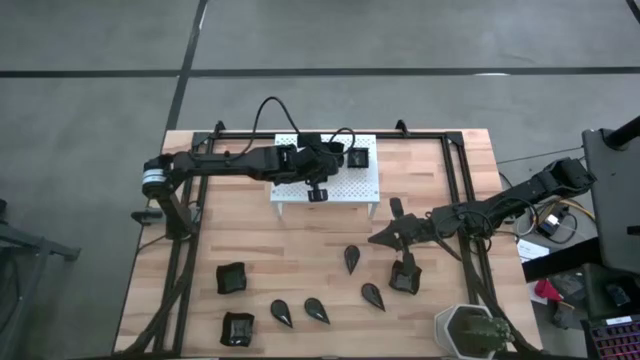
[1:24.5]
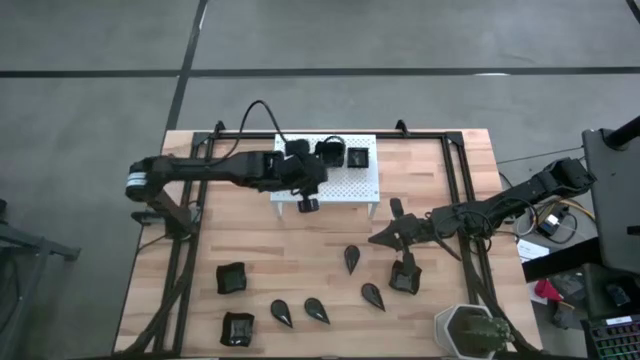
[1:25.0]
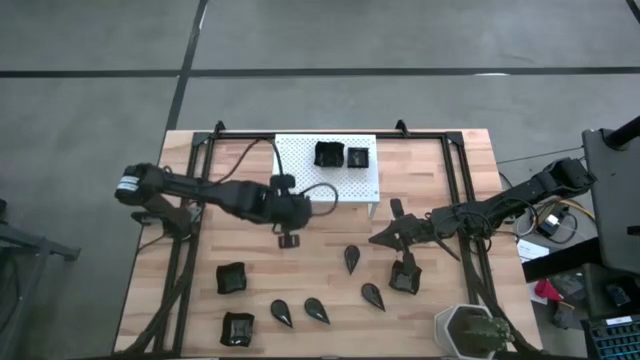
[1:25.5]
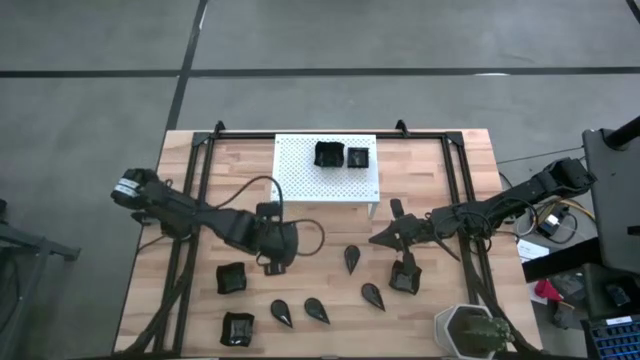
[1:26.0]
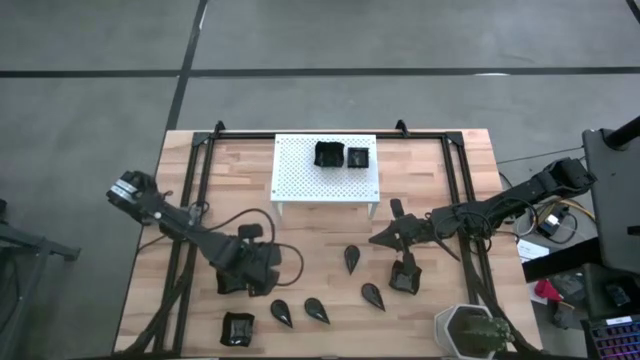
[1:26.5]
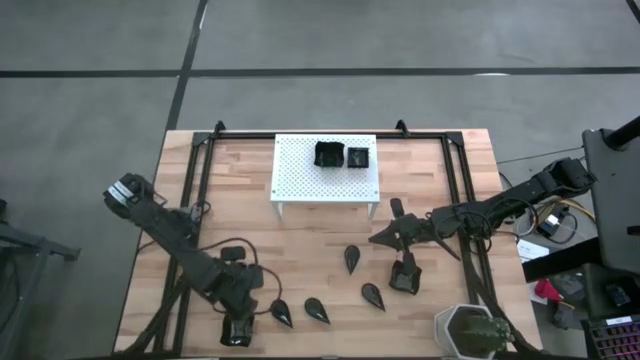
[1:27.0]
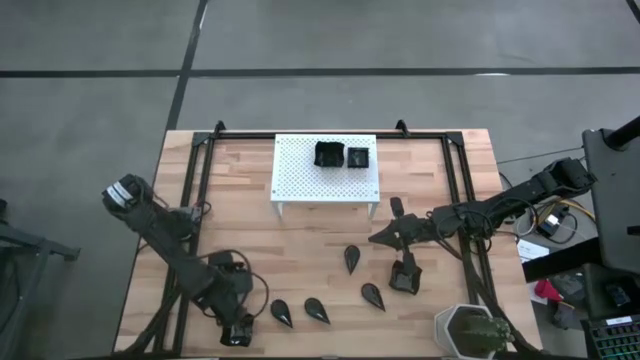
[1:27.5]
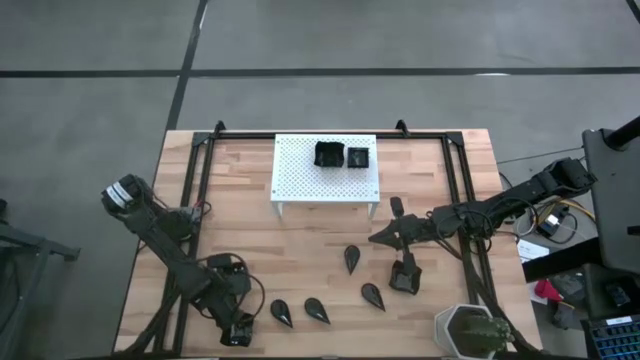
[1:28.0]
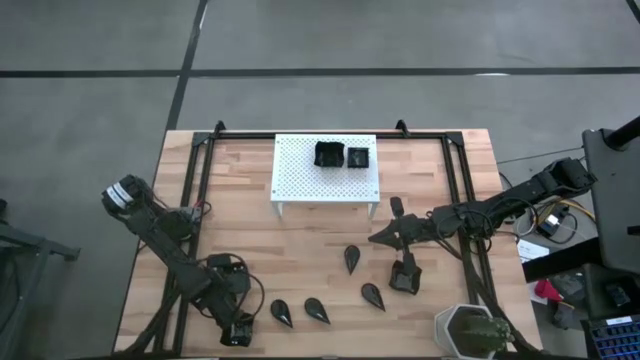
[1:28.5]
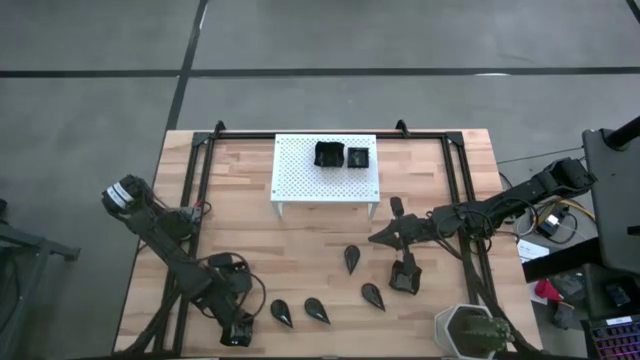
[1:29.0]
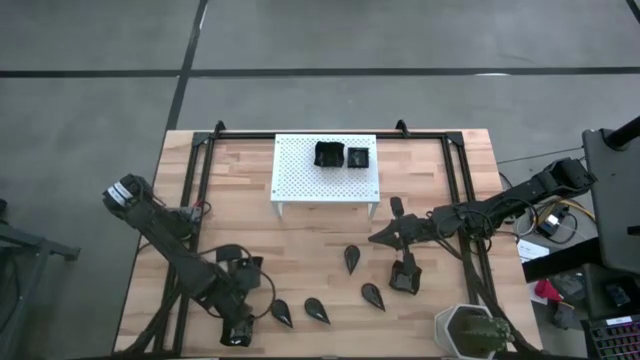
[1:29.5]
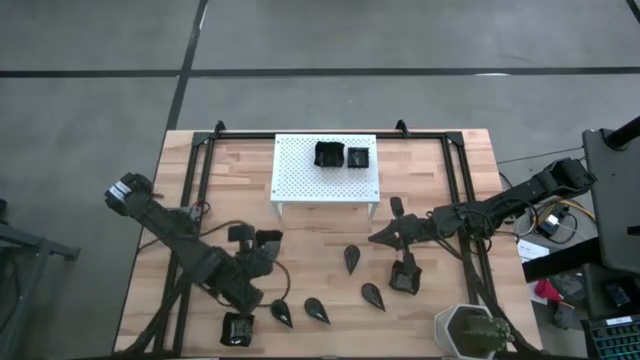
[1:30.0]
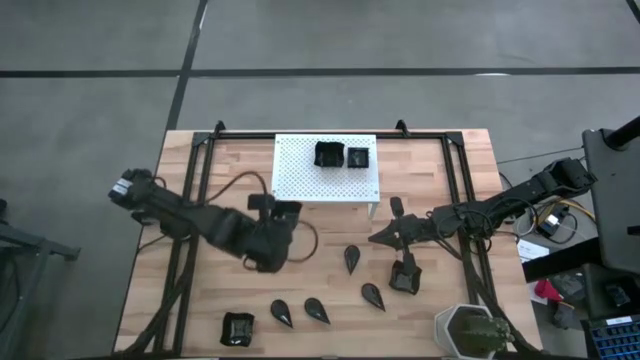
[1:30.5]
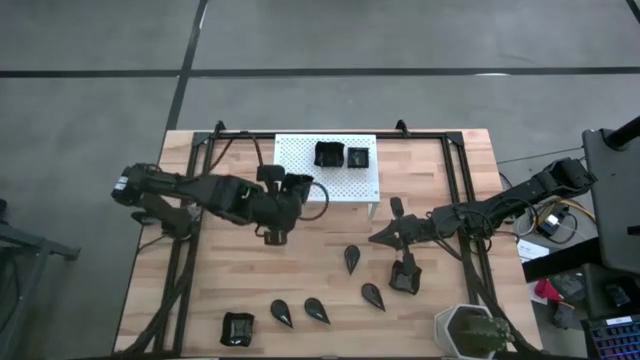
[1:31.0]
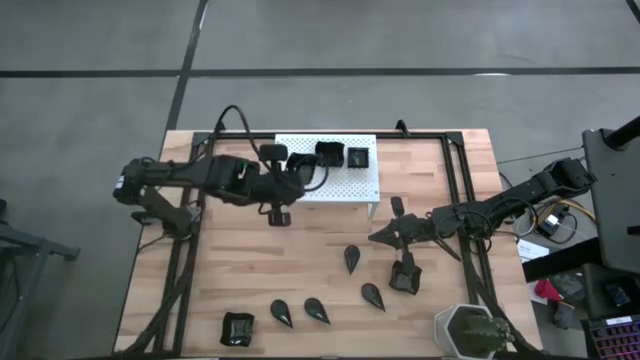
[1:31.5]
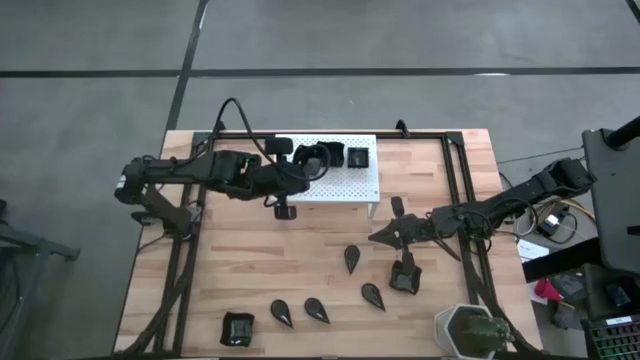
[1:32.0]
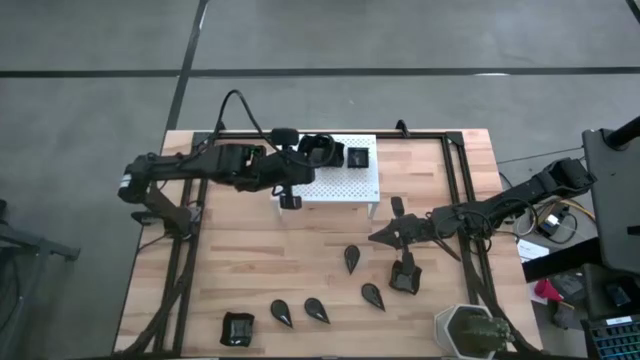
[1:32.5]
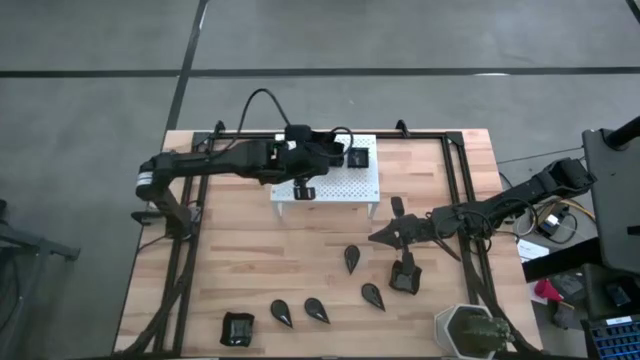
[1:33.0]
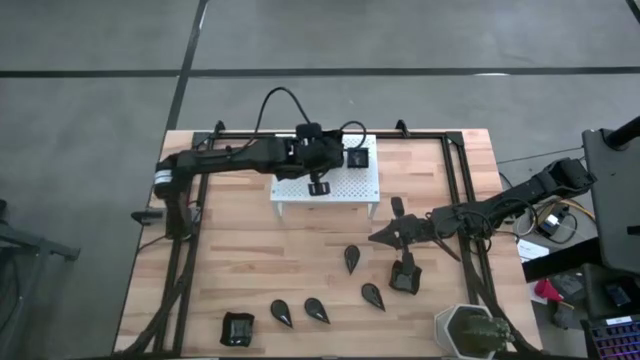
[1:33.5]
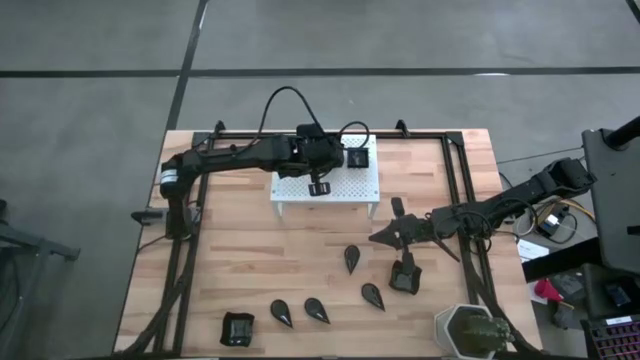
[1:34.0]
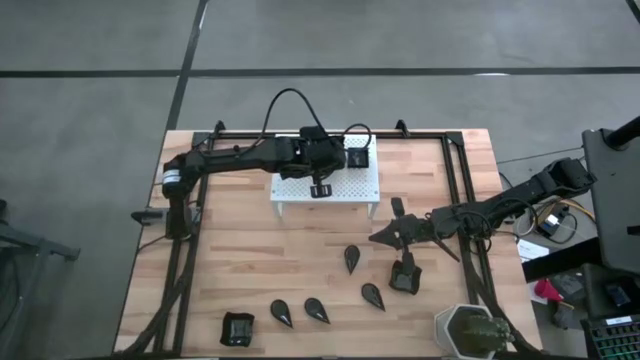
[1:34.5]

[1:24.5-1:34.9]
Task: Pick & Place Mini shaped plates
Stack the distorted square plate on top of the distorted square plate on the shelf

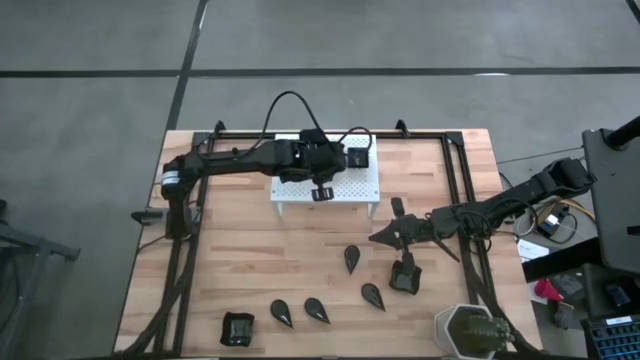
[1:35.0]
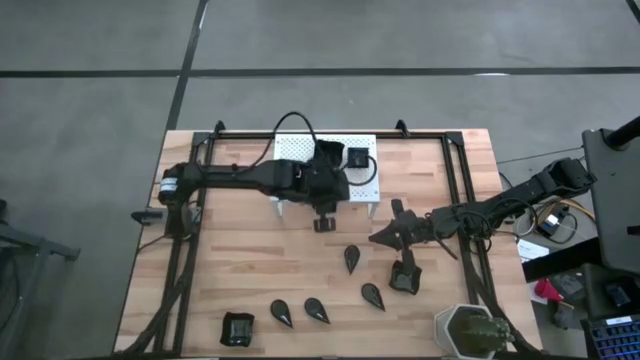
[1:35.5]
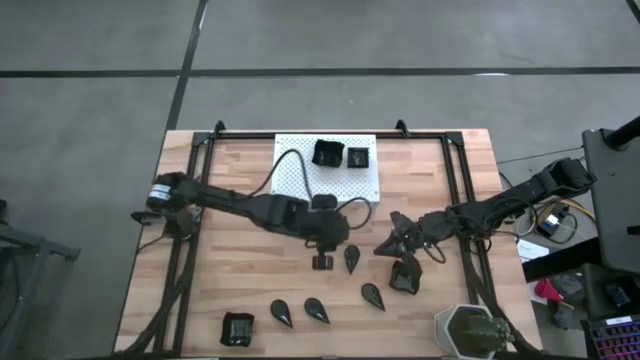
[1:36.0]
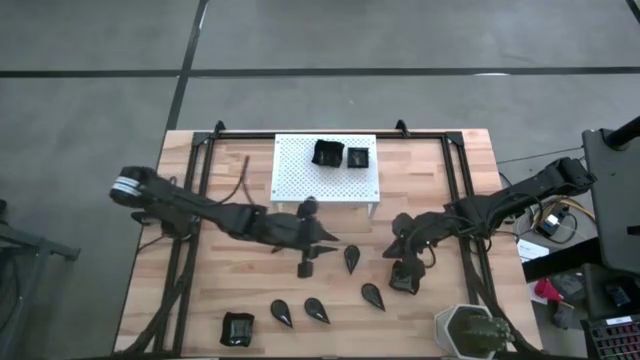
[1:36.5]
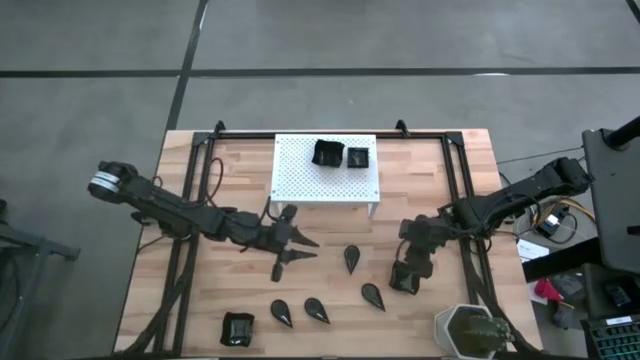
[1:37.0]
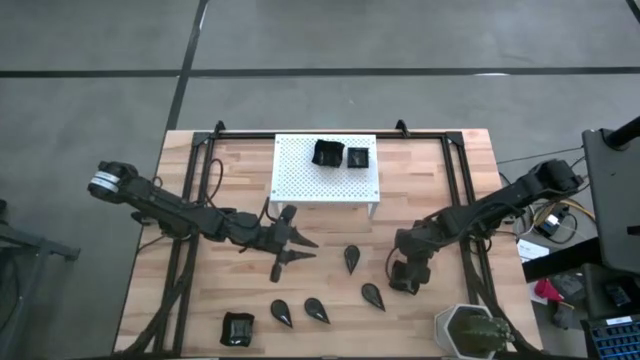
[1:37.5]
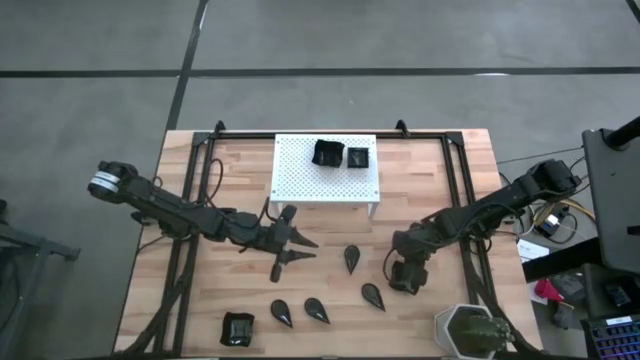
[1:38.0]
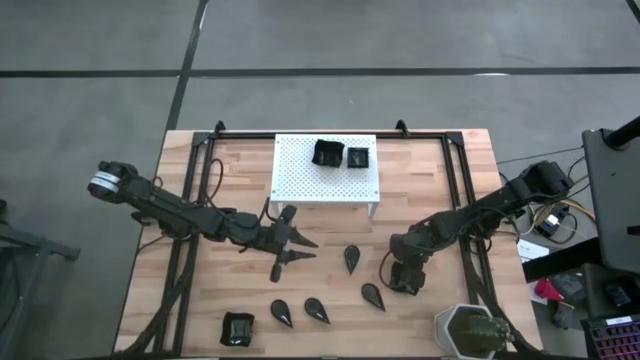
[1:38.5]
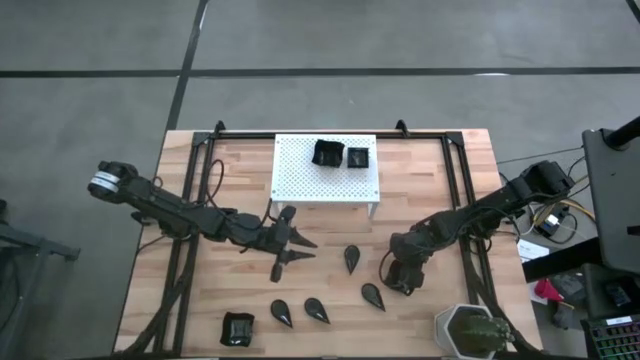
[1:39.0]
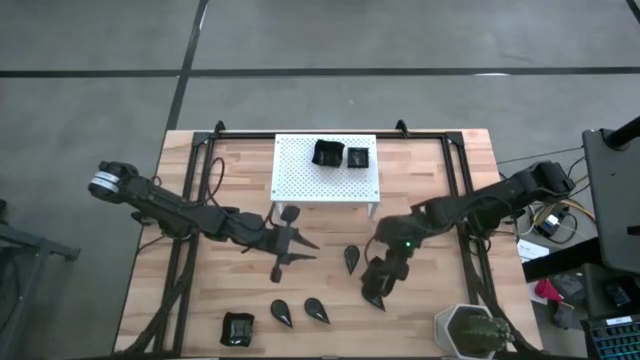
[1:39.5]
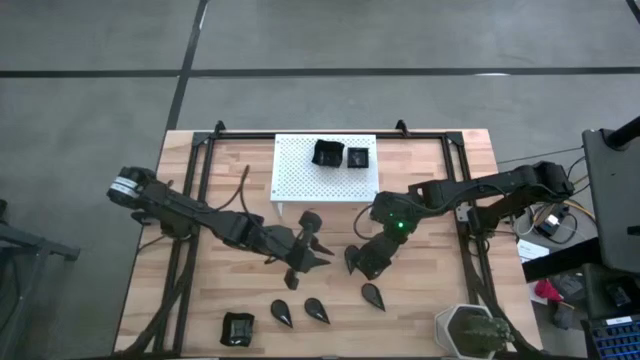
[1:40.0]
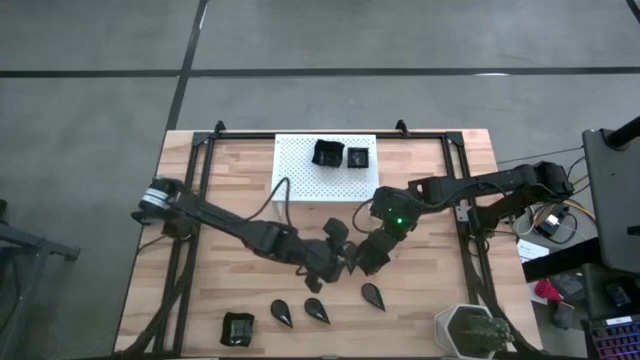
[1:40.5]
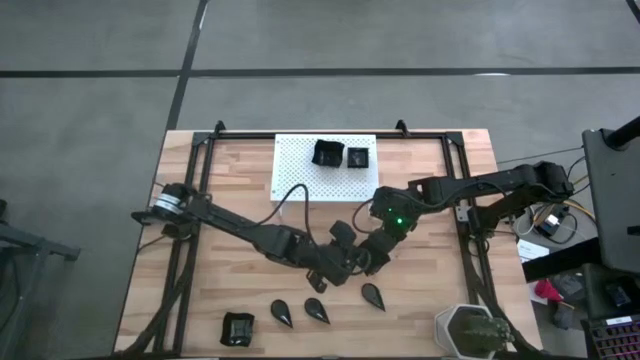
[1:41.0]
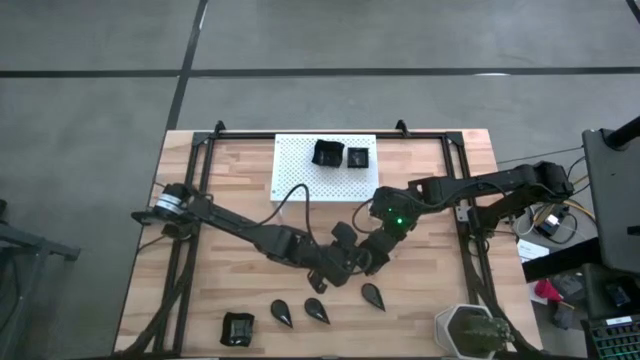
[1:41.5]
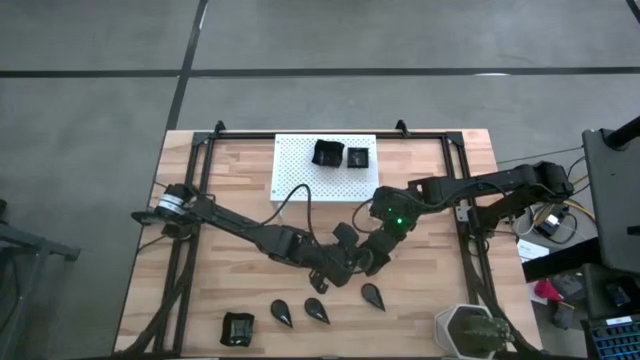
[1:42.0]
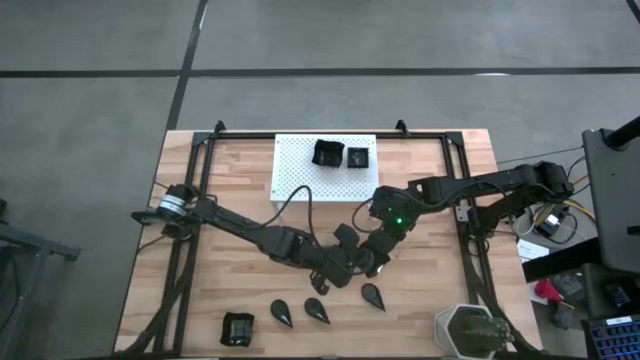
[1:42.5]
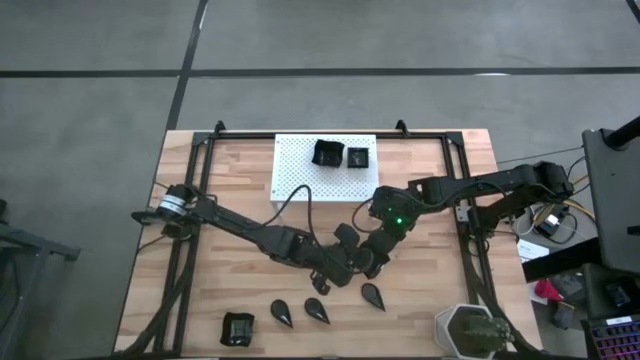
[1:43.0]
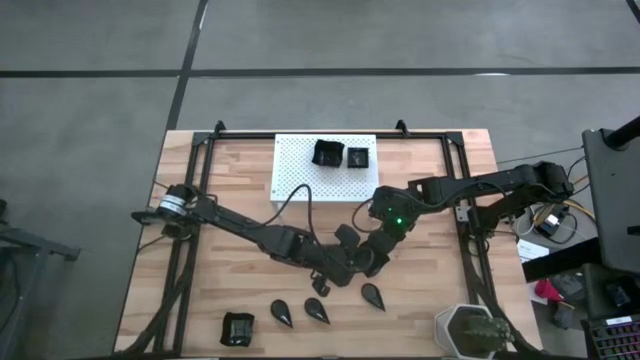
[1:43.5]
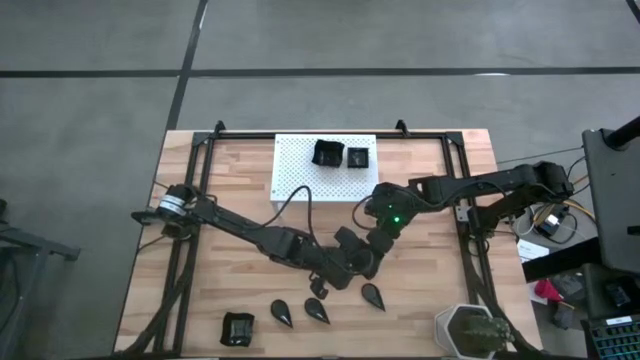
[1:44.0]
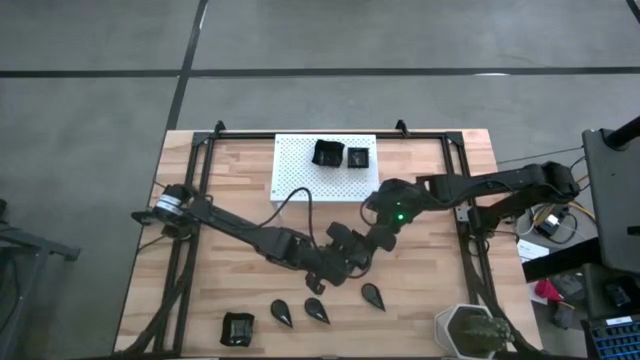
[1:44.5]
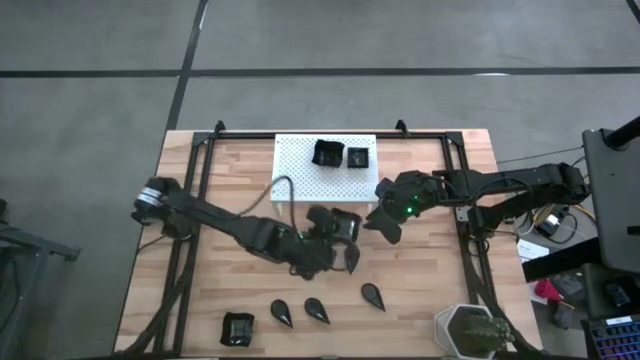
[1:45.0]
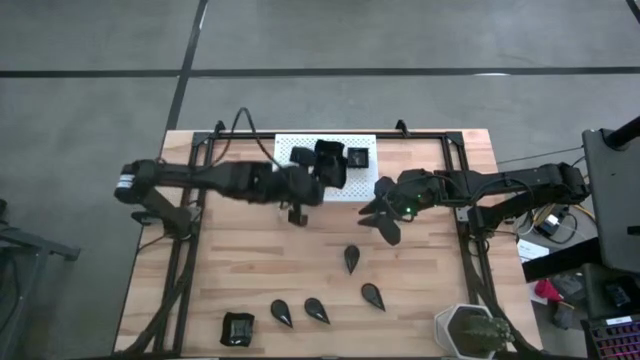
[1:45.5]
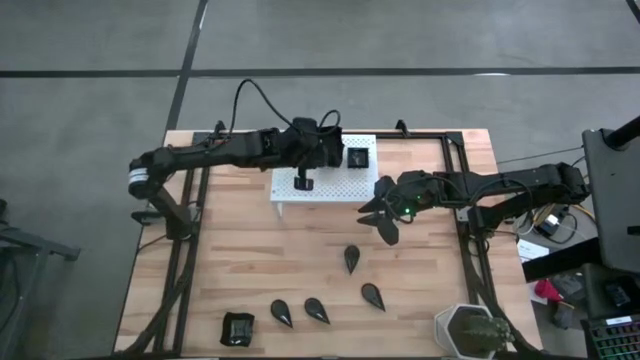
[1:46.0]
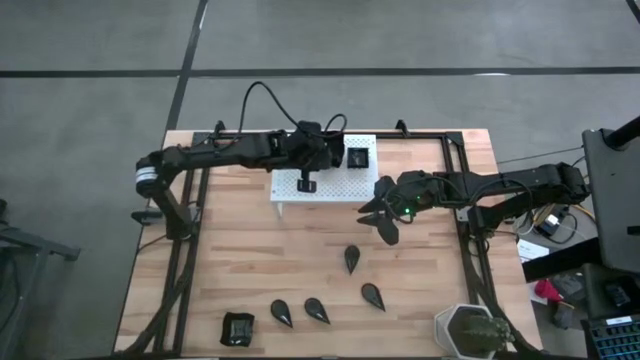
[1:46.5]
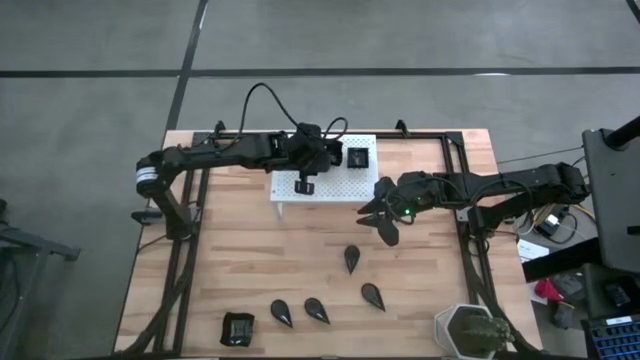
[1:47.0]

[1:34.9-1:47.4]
Stack the distorted square plate on top of the distorted square plate on the shelf
